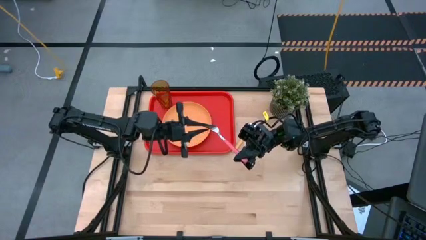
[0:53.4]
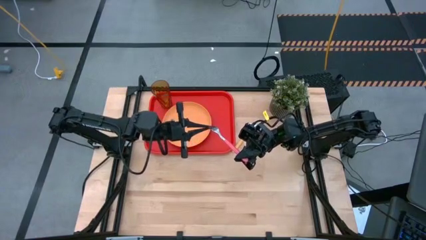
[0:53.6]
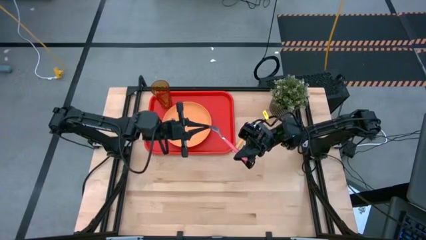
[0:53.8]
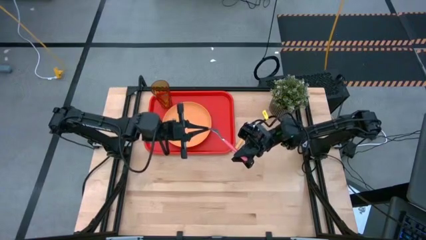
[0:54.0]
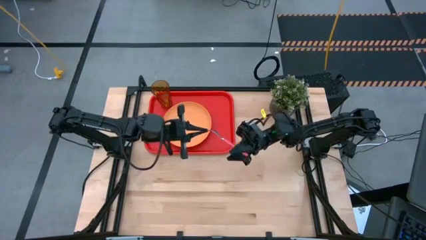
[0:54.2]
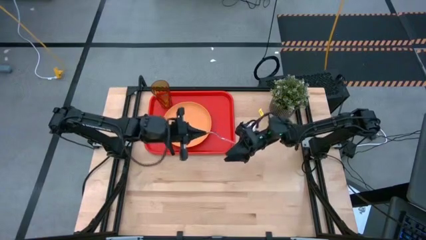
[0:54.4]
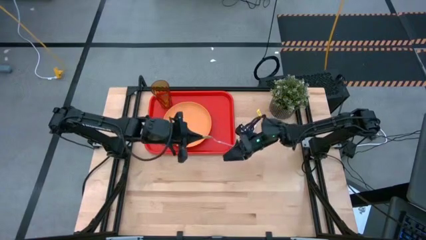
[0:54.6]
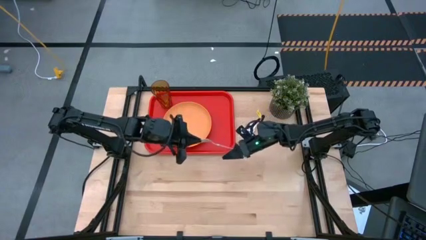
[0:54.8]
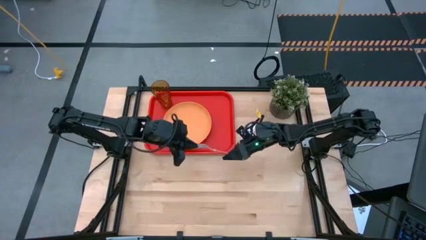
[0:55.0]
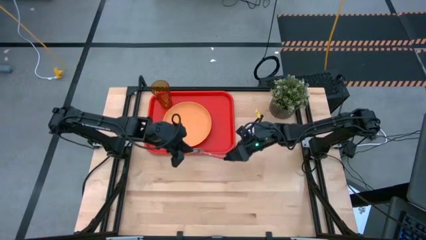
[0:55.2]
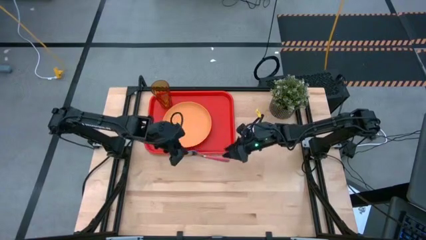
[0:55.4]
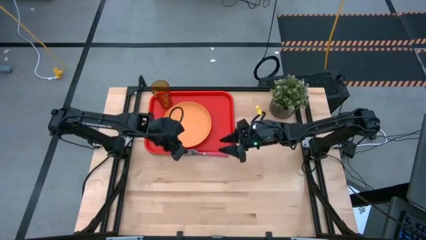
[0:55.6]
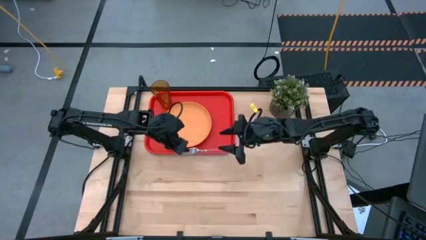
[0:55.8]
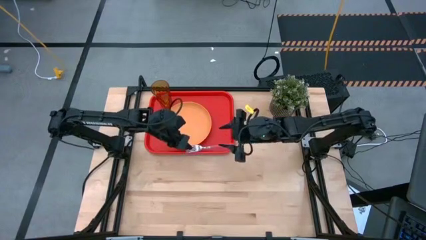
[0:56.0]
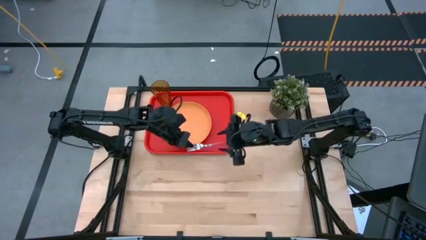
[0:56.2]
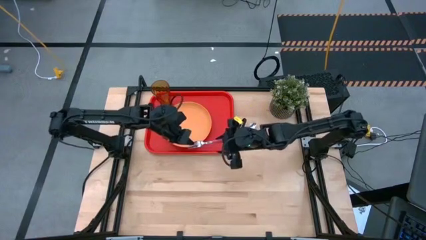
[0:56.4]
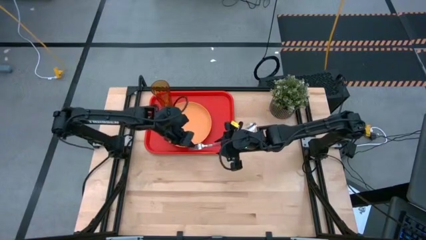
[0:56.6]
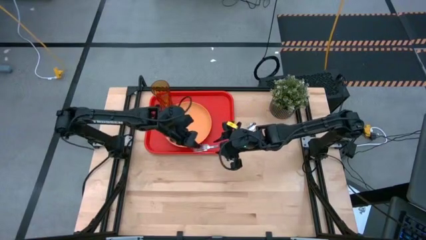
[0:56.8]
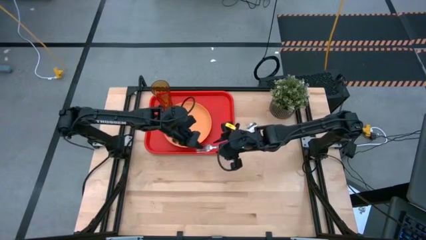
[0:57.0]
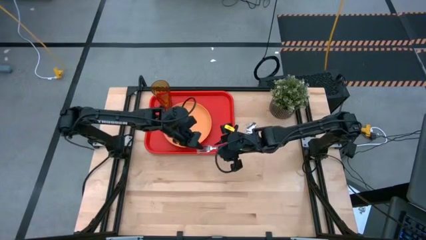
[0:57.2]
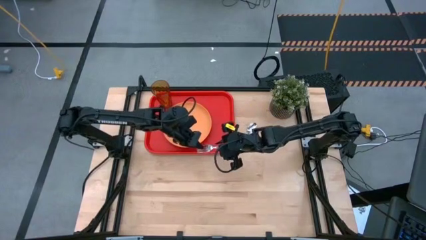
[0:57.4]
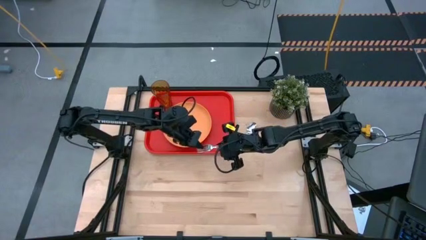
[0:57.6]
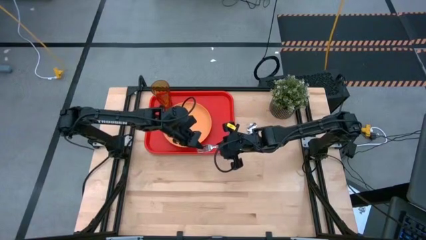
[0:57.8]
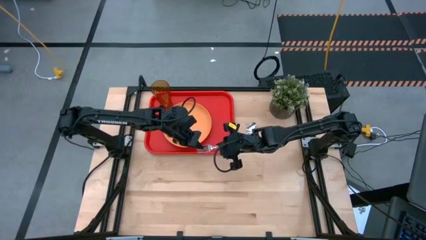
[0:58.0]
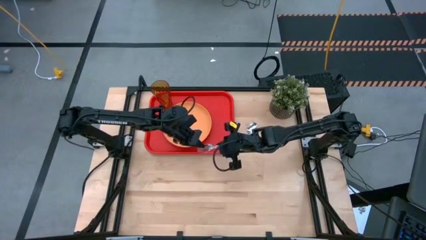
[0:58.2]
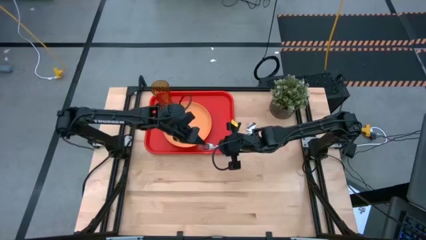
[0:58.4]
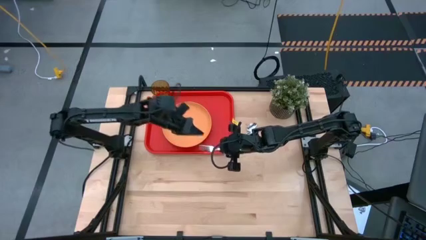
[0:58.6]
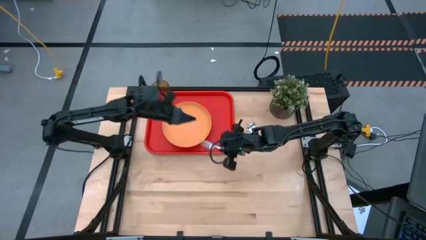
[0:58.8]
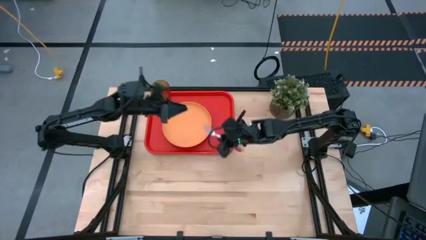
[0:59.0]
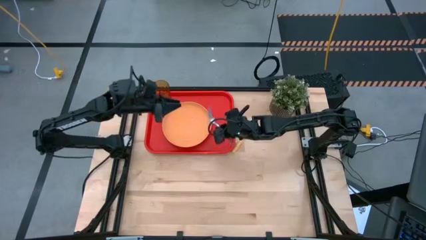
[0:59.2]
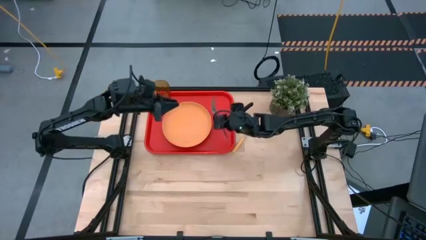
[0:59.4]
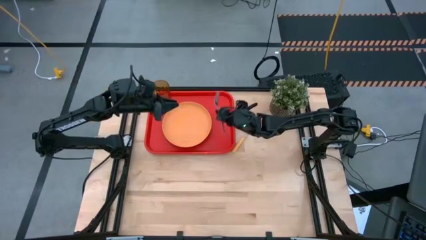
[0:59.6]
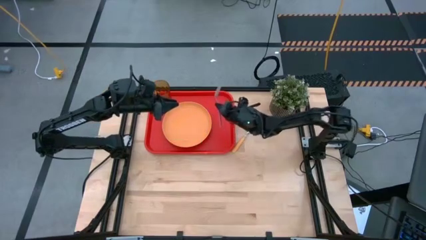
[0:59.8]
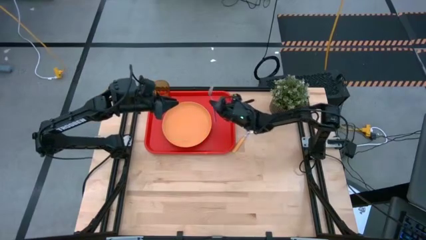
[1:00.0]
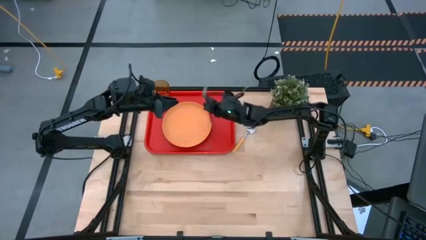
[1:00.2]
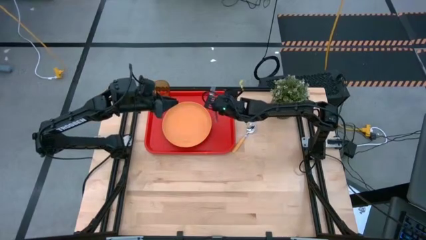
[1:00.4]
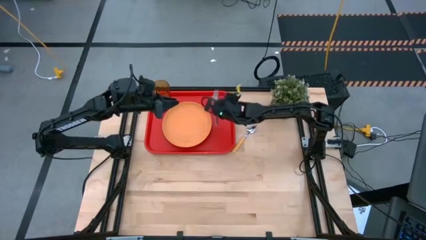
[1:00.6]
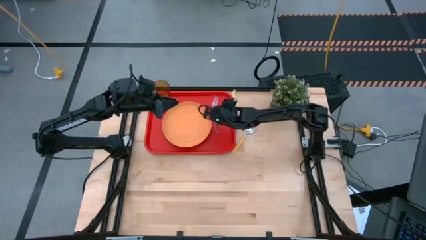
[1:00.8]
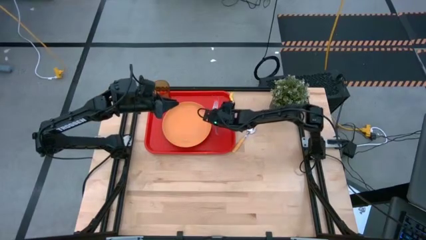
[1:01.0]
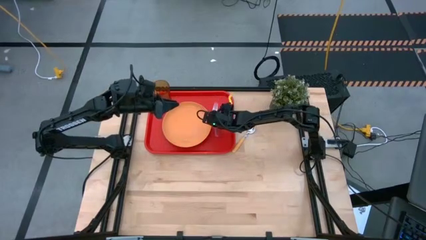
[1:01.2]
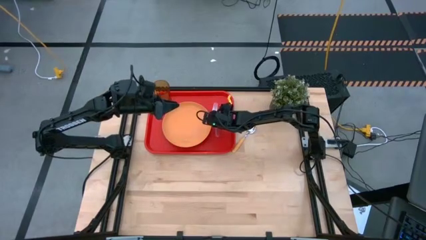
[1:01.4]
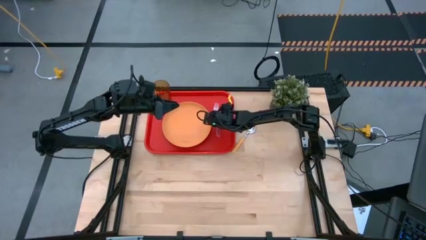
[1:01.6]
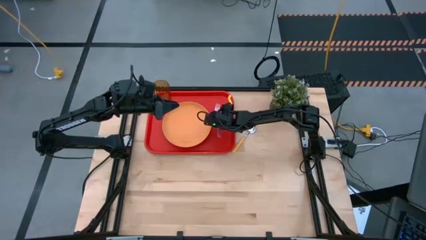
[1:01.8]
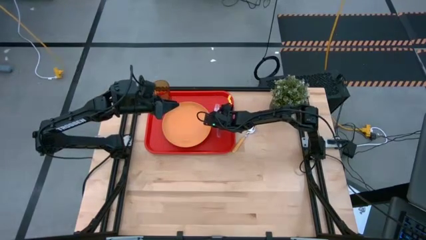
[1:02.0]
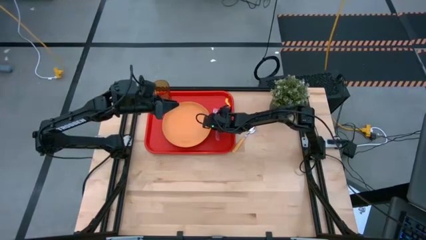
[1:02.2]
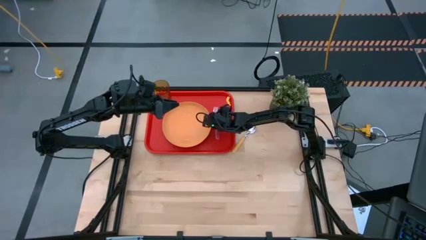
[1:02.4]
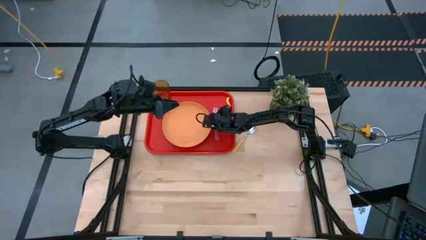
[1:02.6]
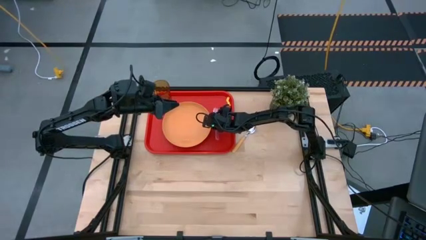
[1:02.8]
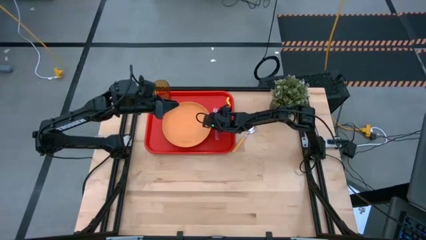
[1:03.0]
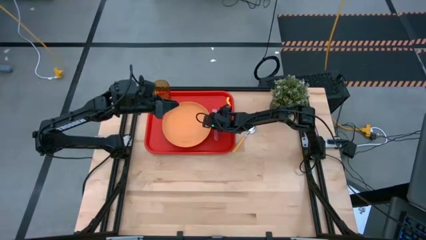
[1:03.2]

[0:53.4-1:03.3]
Task: Pick and place plate/cup/fork/spoon on tray
Put the pink fork on the red tray to the right of the orange plate

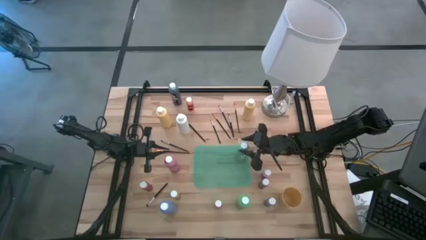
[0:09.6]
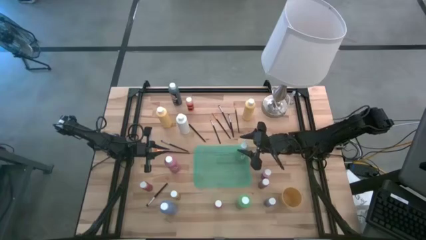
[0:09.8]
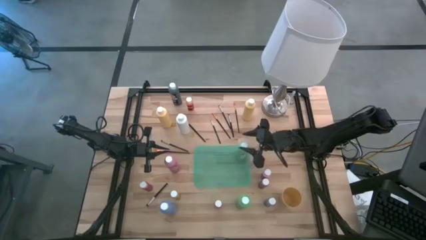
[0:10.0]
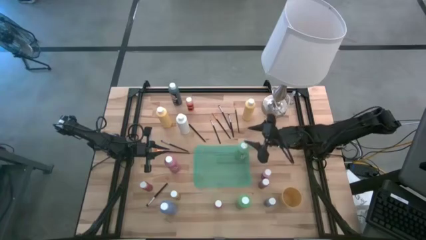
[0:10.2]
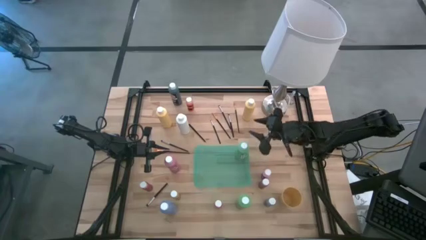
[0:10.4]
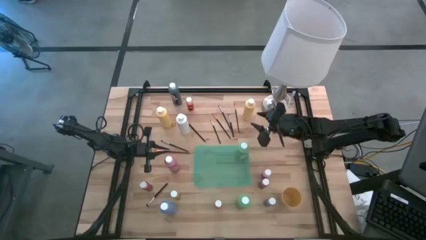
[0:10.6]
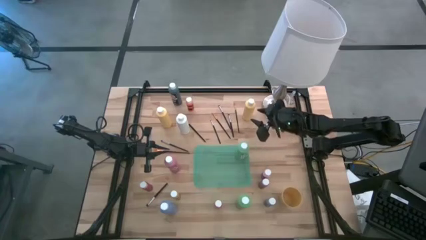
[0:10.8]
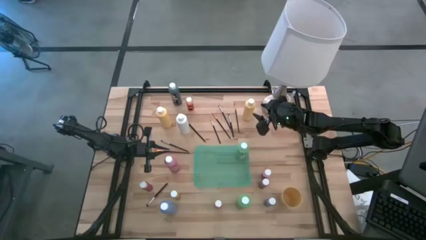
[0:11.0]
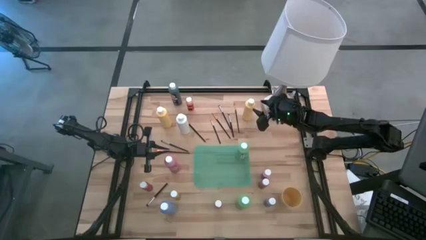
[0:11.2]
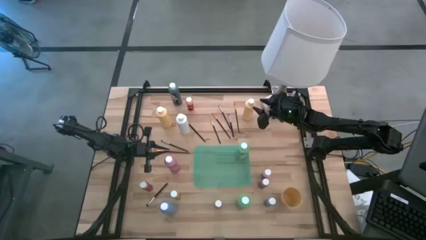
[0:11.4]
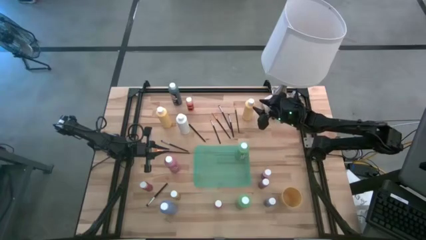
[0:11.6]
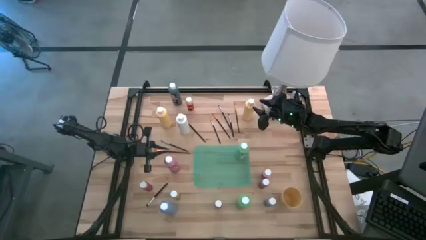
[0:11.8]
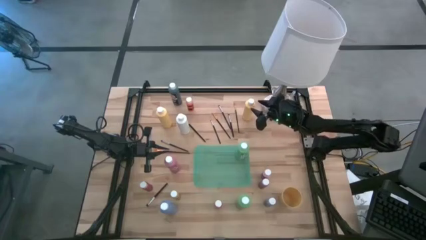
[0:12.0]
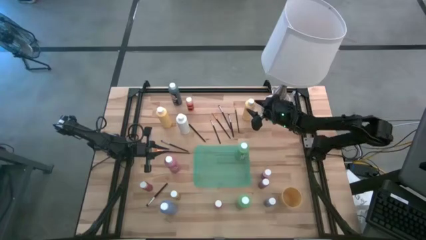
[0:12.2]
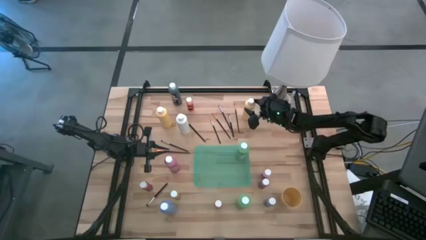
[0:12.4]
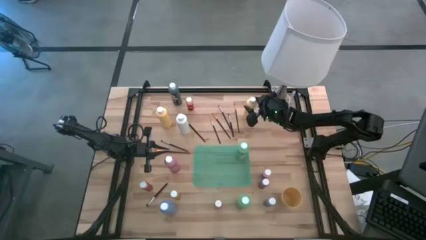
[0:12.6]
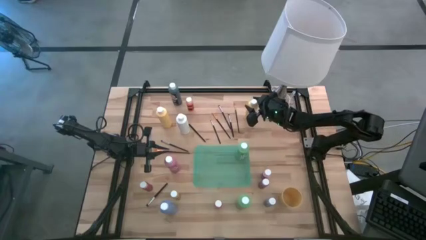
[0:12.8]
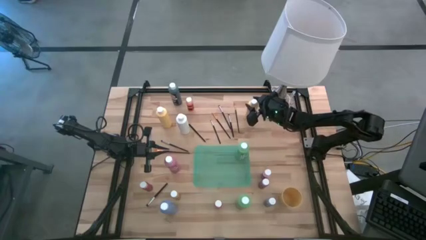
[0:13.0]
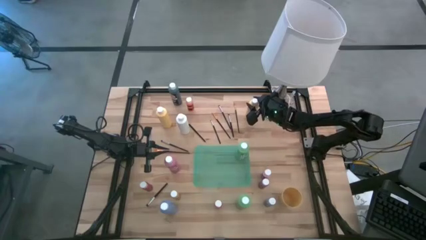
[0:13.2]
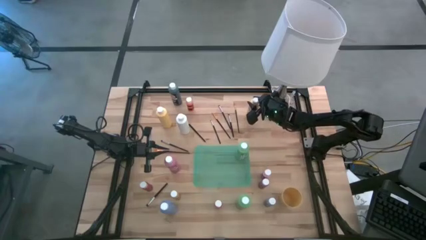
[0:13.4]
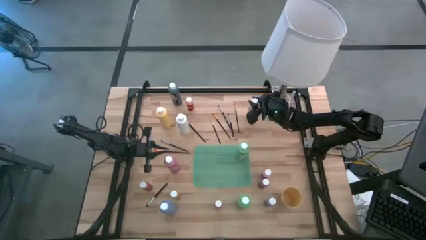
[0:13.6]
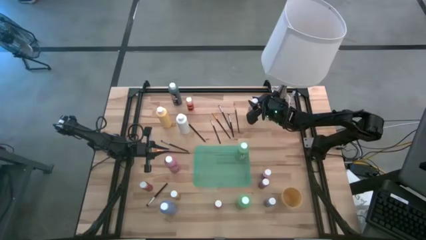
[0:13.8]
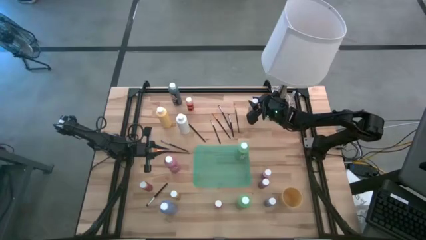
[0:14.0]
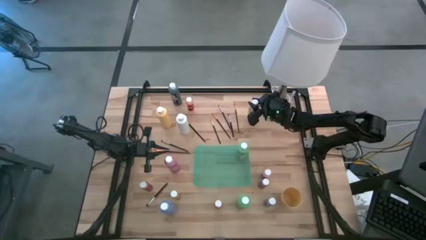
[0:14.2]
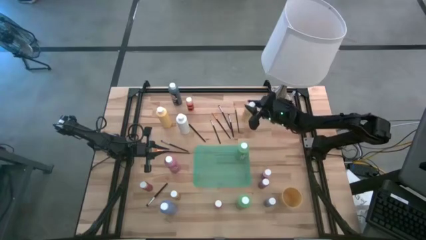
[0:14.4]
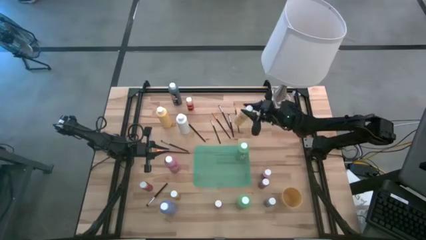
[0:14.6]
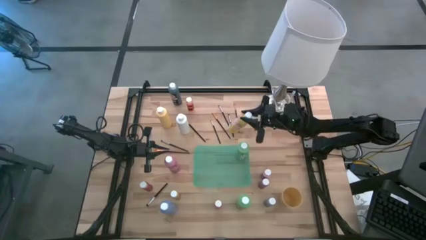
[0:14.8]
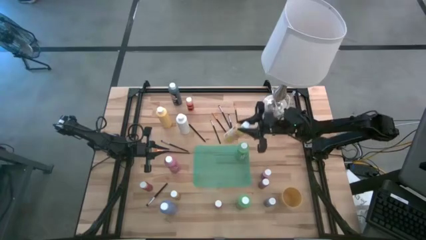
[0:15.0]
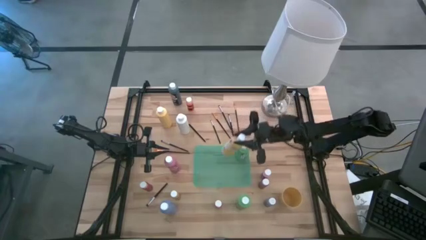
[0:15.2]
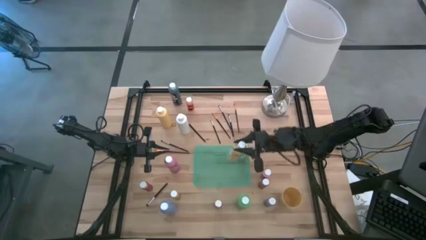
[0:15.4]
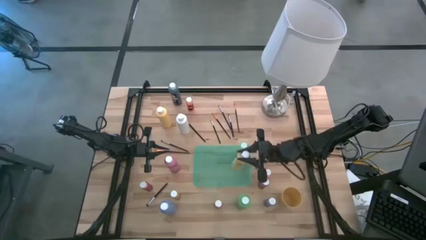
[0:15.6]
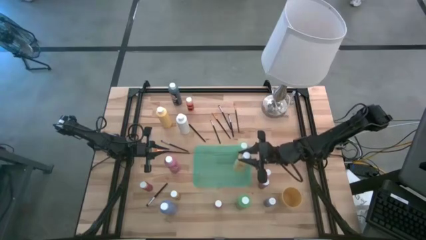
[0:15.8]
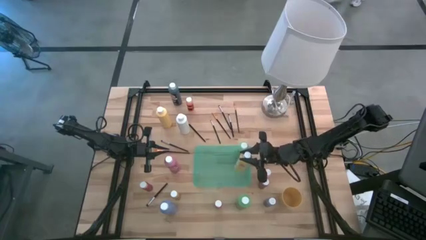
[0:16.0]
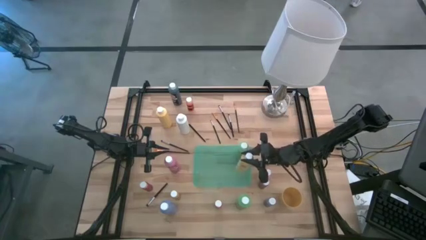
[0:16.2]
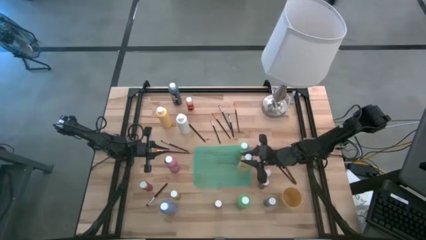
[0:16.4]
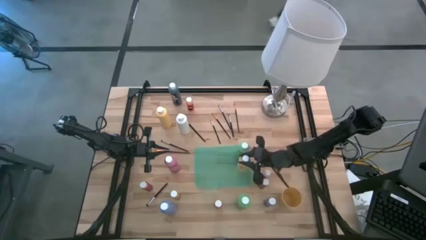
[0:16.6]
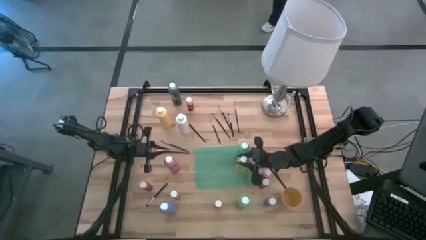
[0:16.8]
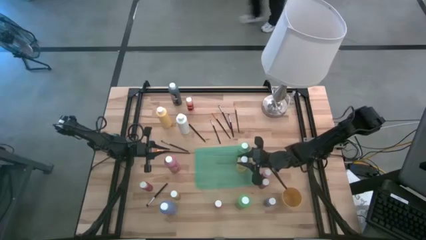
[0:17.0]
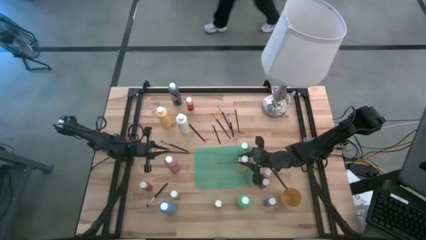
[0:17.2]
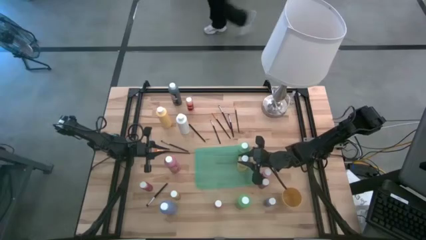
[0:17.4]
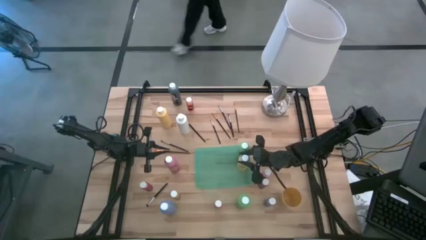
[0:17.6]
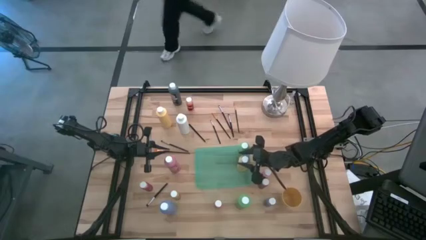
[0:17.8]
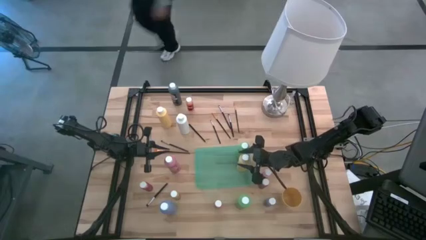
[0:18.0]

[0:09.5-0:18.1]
Task: Pick & Place Paint Supplies
Put the yellow paint bottle into the green bin
